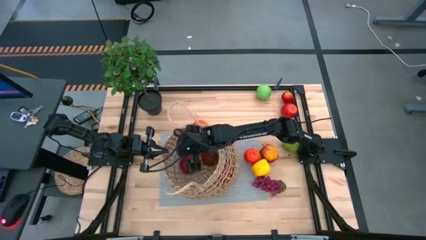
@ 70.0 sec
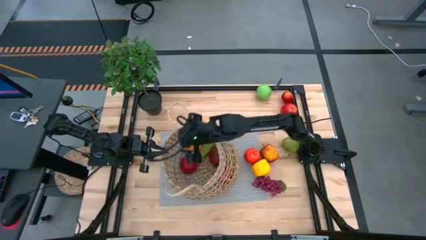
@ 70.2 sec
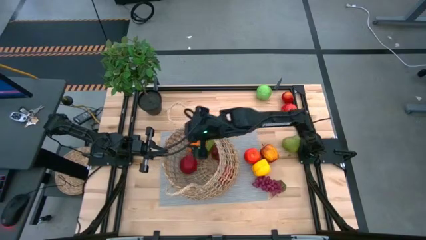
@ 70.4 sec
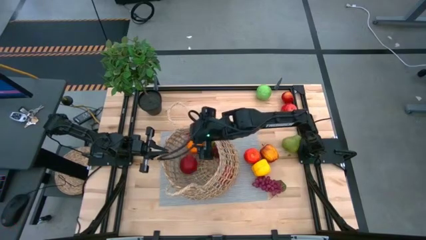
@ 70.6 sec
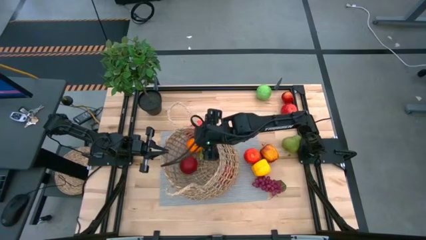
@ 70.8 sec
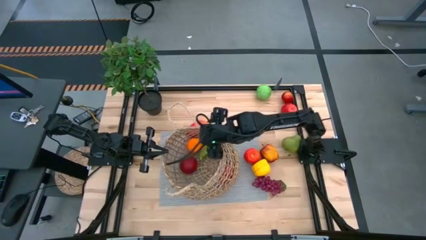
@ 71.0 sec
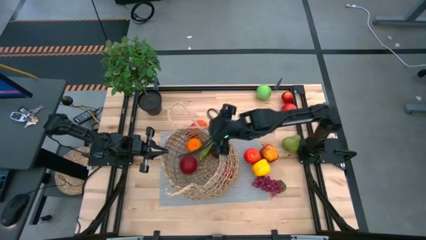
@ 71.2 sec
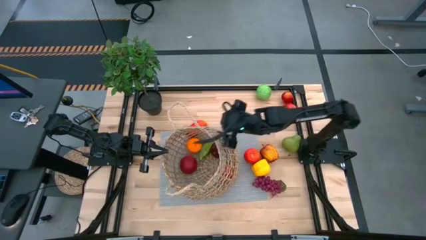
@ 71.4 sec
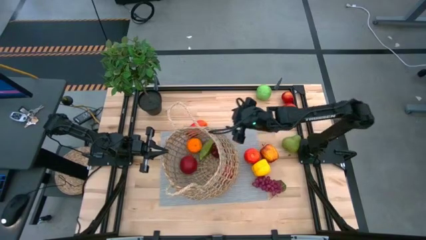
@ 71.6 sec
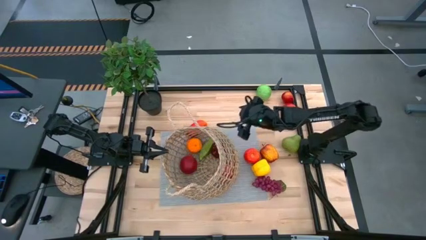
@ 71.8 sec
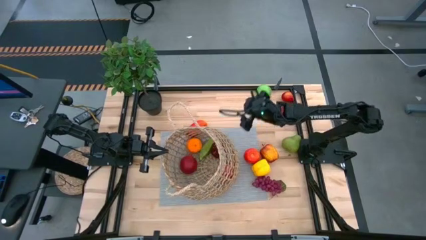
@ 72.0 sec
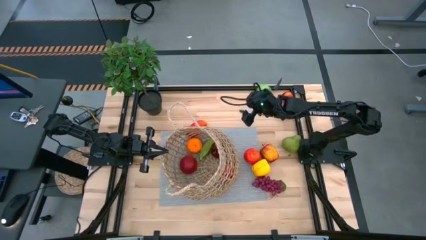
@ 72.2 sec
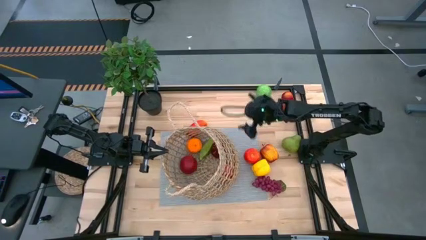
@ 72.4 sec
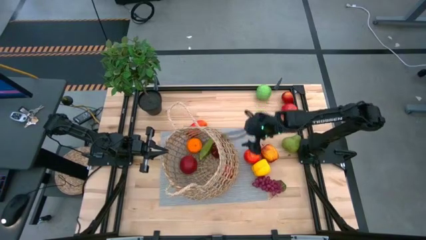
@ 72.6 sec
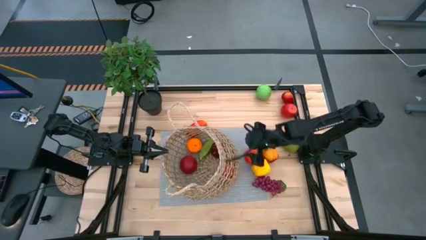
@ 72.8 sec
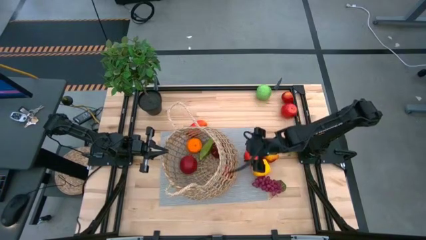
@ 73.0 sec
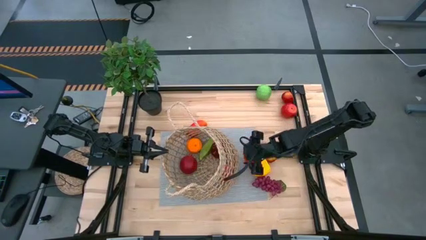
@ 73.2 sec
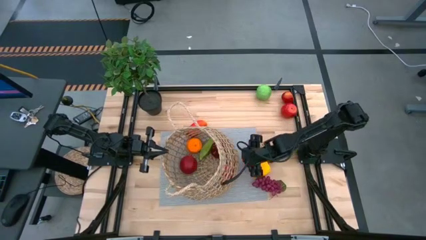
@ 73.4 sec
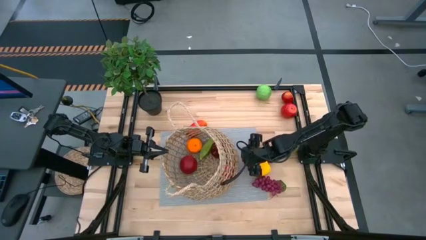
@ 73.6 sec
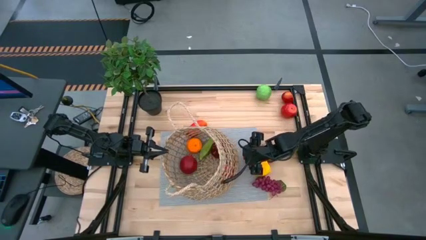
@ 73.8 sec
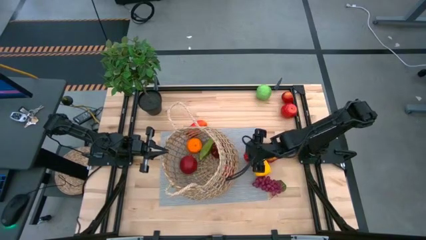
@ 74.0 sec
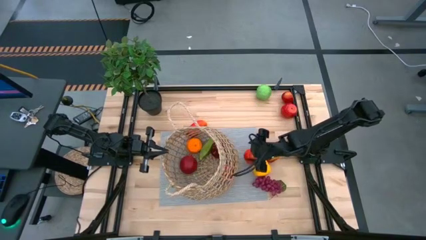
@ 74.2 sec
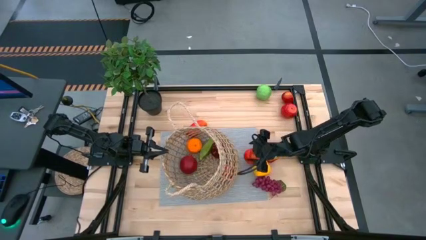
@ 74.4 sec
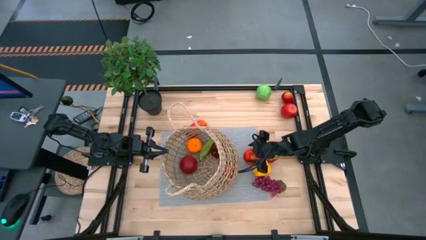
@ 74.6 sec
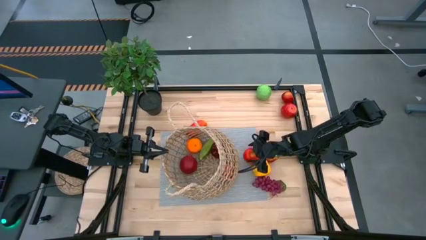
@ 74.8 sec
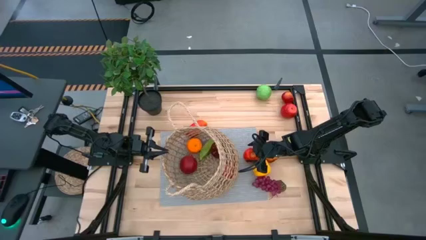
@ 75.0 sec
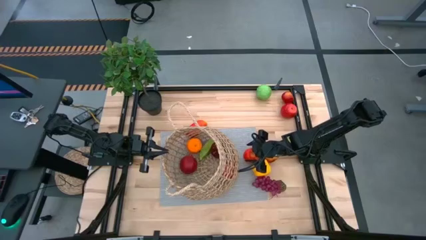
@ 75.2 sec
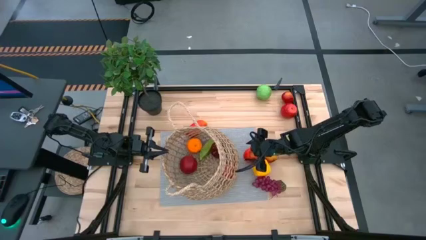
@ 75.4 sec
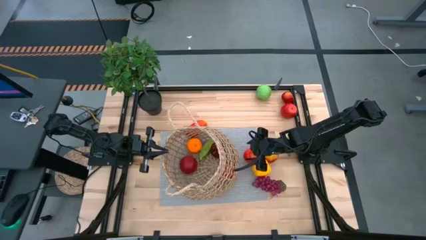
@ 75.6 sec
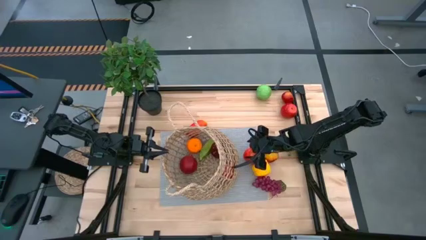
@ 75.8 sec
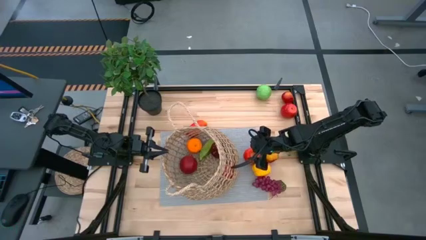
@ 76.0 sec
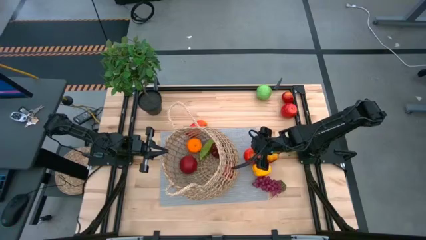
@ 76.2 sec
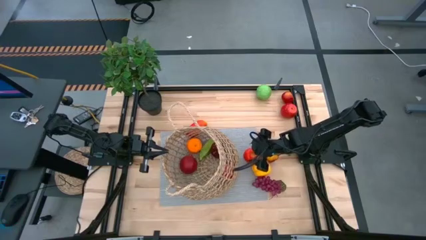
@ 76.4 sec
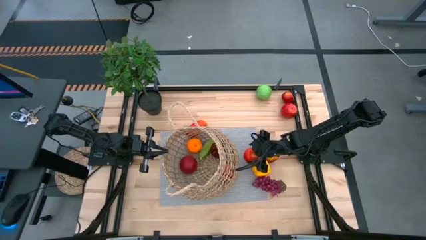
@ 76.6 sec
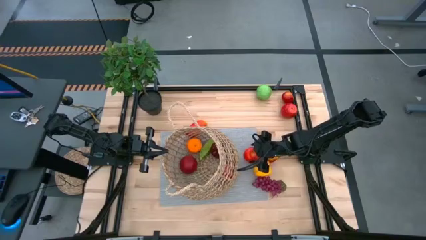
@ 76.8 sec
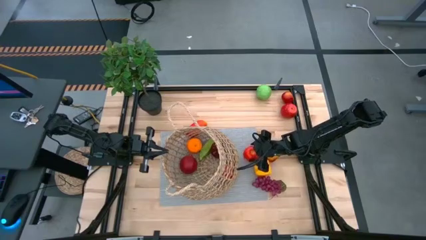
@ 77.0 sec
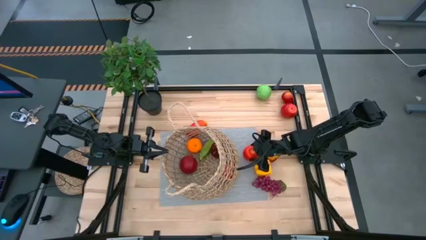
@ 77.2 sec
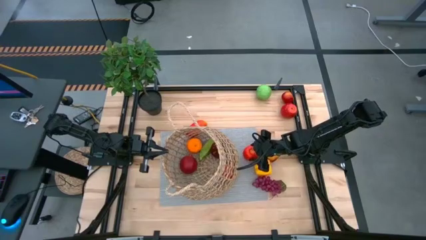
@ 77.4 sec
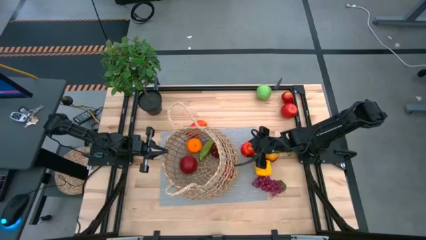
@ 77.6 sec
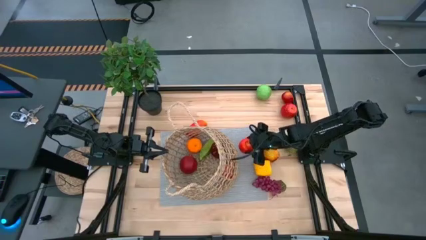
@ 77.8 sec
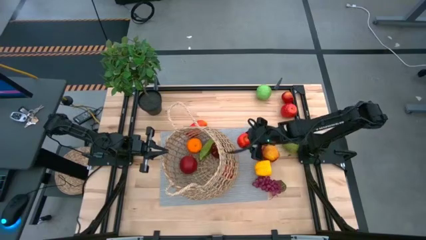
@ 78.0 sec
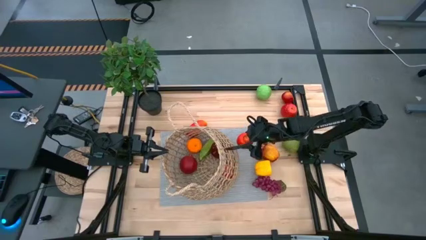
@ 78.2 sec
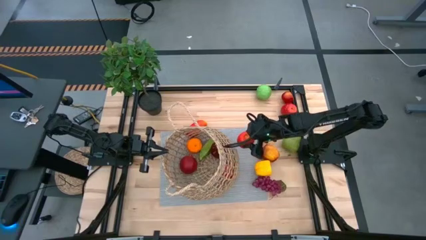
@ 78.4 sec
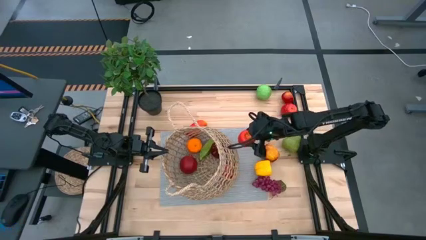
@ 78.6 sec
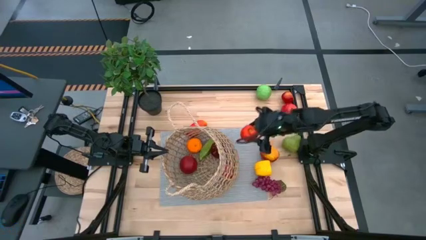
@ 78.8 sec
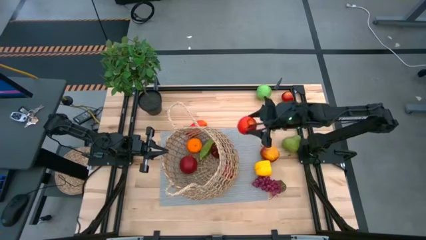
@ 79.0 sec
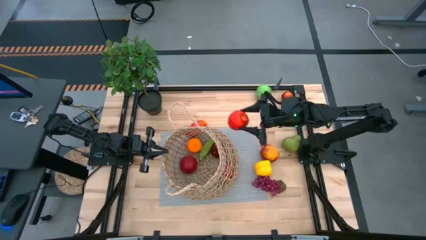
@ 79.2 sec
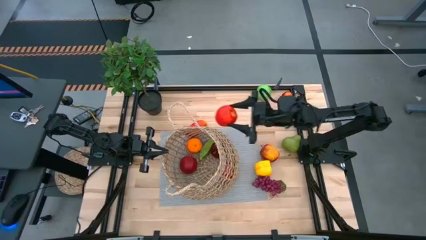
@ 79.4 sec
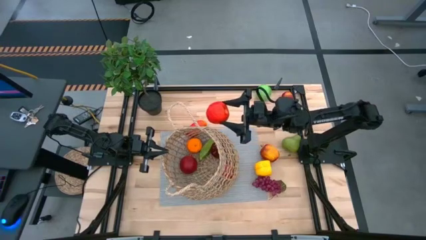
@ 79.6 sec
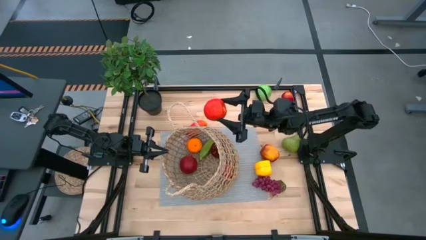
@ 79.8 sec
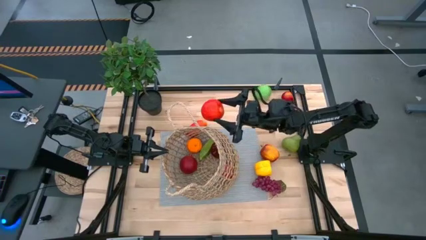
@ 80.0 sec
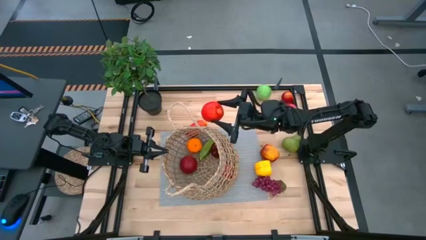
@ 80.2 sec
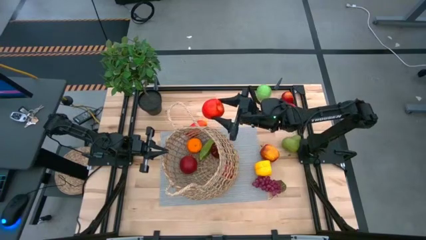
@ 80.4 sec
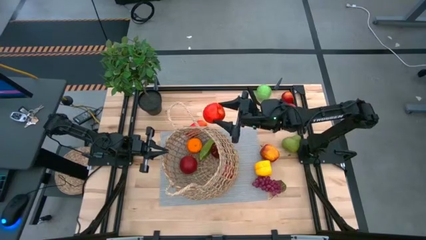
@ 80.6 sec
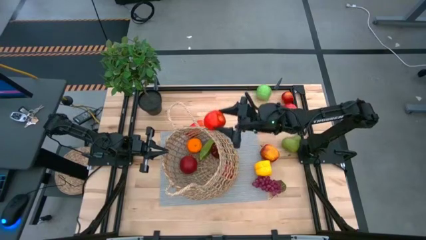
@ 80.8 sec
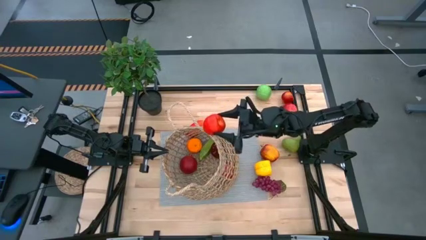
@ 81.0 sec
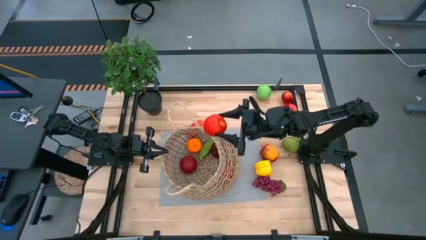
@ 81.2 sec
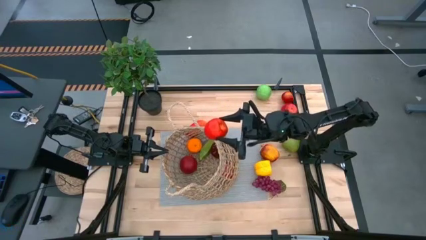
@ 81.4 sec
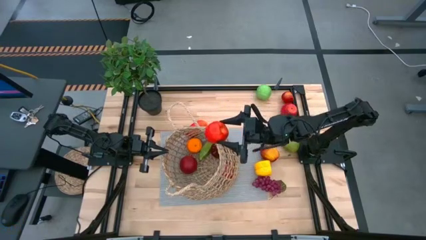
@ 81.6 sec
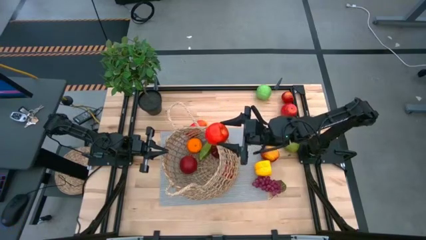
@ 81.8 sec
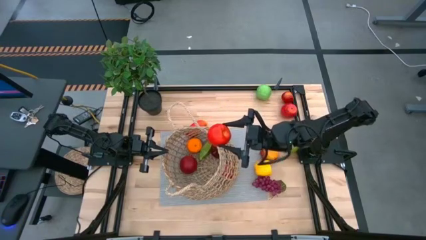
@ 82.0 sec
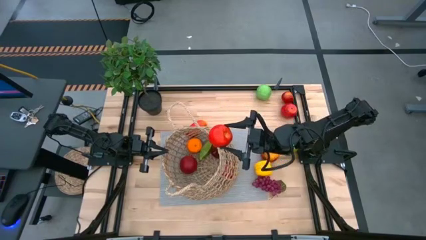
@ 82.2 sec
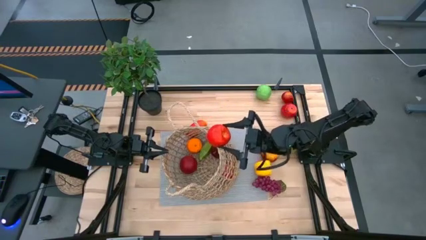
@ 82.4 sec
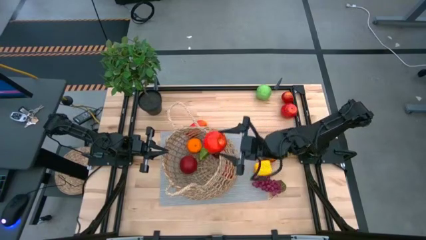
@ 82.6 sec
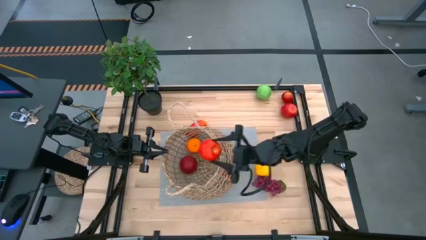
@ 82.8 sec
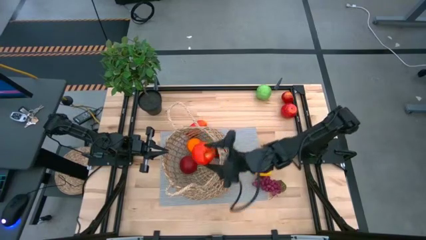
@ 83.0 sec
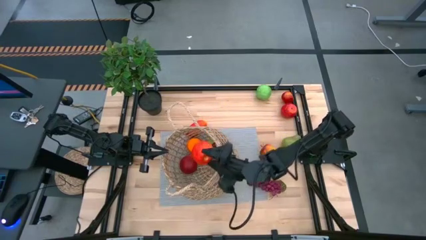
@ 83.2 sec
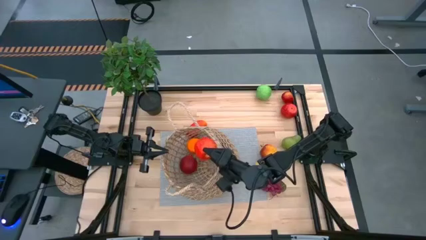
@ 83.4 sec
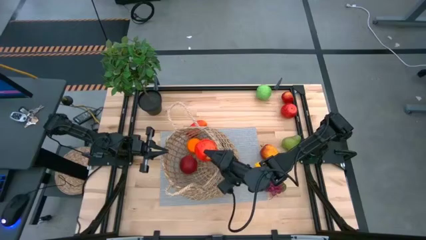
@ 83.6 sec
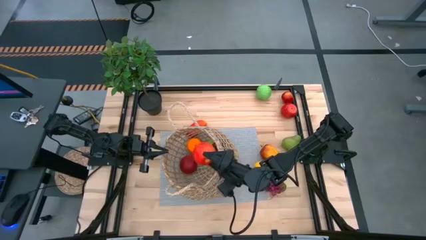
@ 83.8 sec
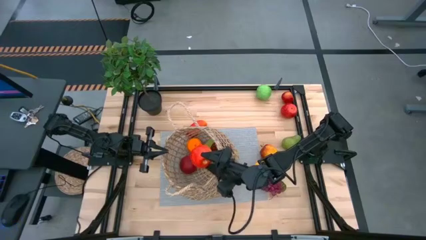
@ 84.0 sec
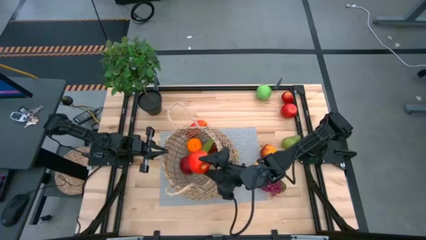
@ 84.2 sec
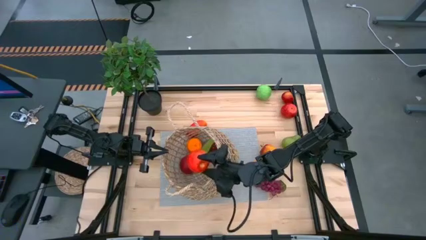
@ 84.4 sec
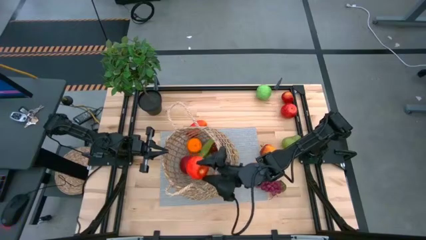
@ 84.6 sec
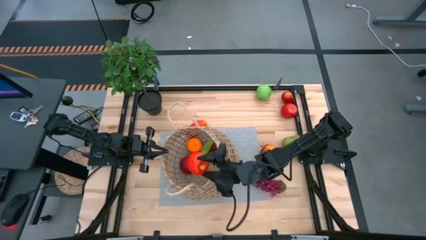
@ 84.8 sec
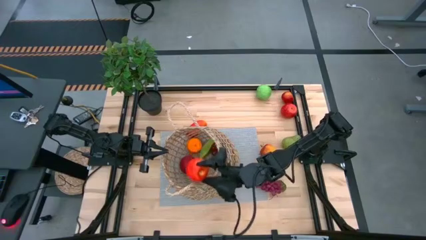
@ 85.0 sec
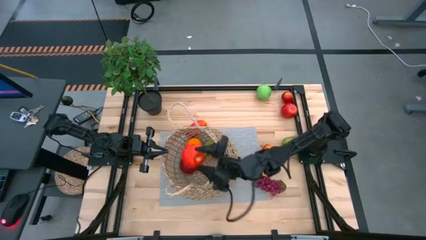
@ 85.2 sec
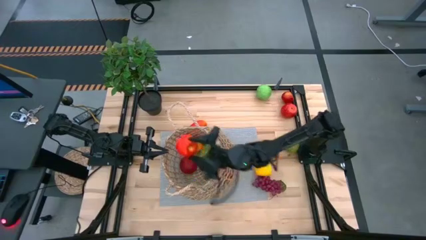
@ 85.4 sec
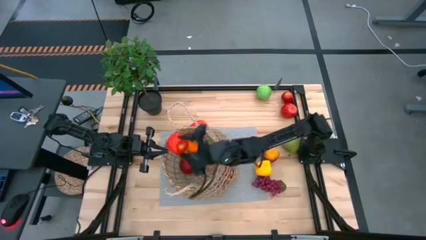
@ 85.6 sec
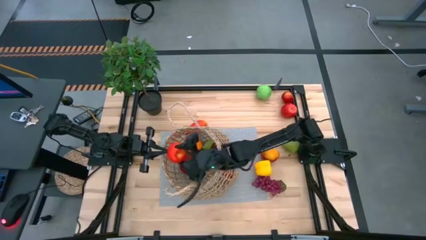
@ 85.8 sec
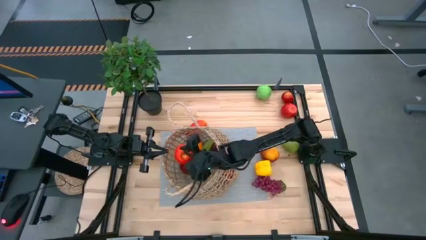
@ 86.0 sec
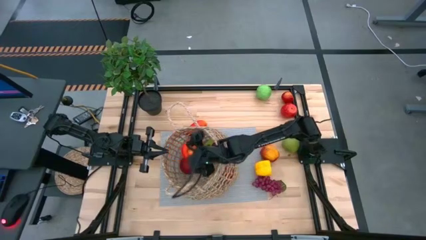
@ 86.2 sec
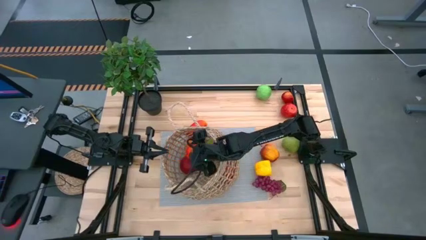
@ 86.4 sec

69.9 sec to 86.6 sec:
Task: Build produce basket
Put the red apple into the brown woven basket
